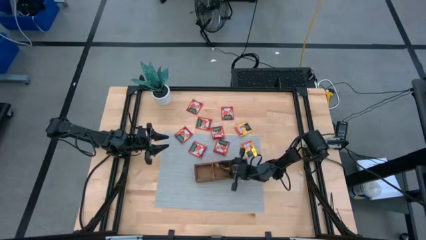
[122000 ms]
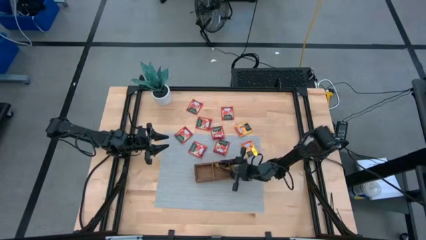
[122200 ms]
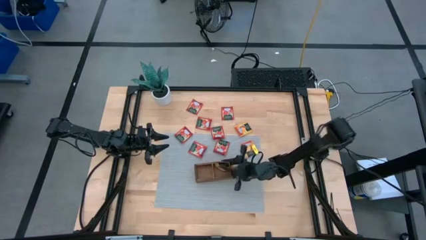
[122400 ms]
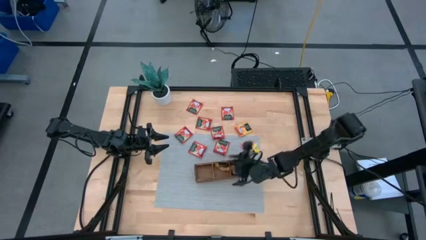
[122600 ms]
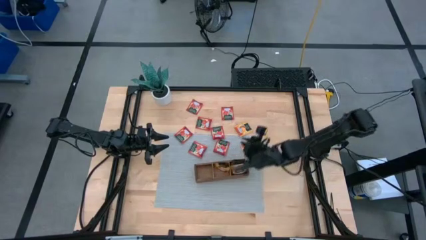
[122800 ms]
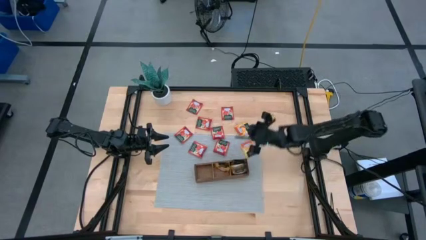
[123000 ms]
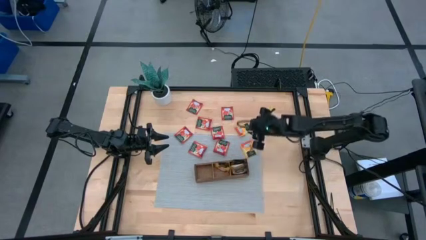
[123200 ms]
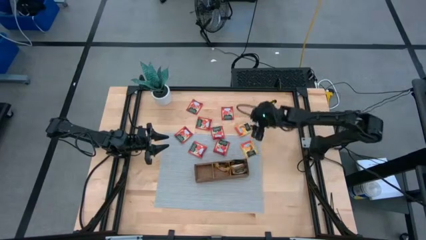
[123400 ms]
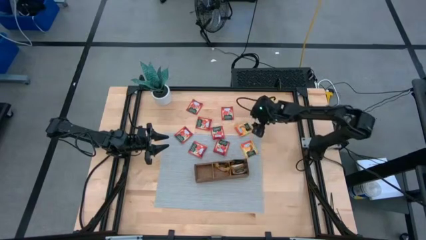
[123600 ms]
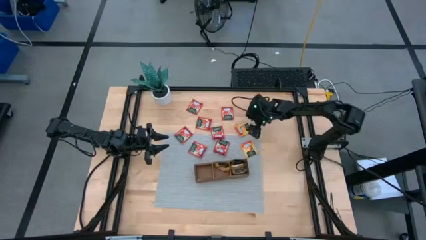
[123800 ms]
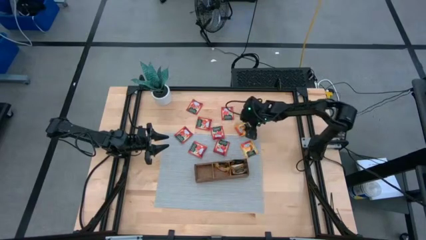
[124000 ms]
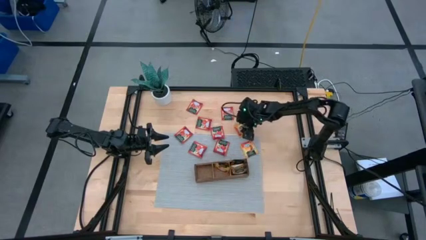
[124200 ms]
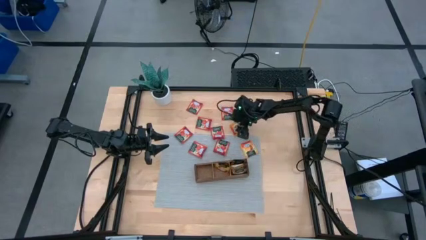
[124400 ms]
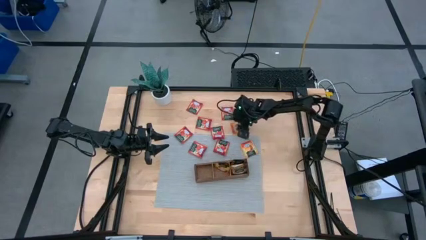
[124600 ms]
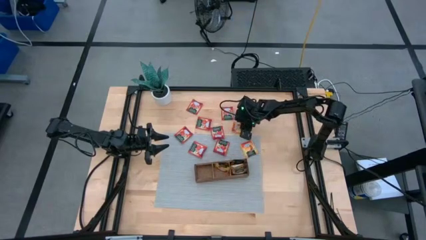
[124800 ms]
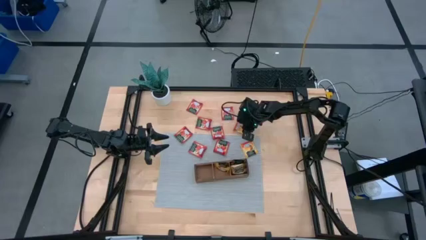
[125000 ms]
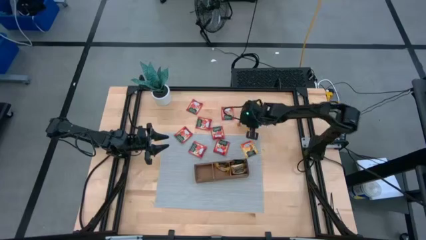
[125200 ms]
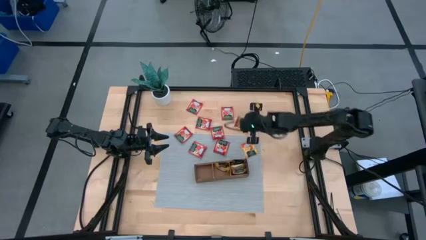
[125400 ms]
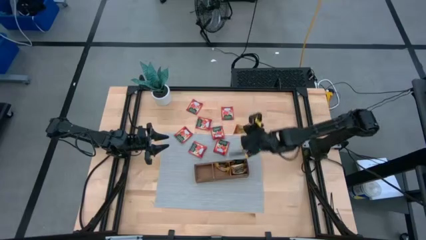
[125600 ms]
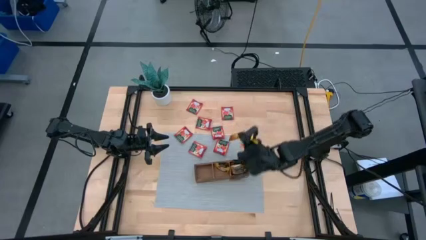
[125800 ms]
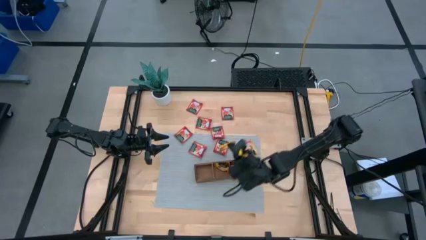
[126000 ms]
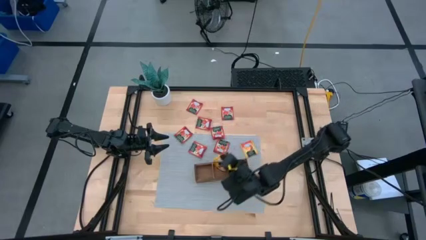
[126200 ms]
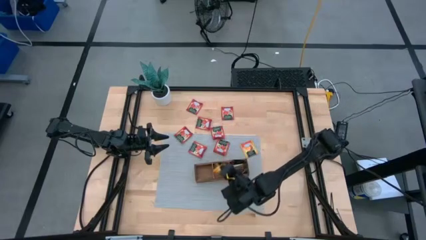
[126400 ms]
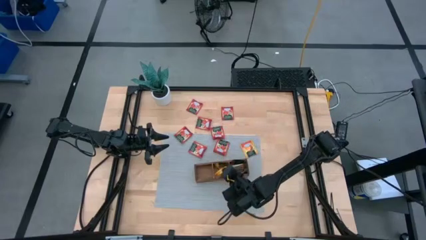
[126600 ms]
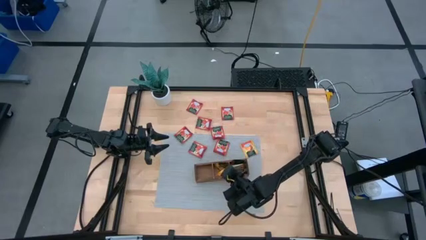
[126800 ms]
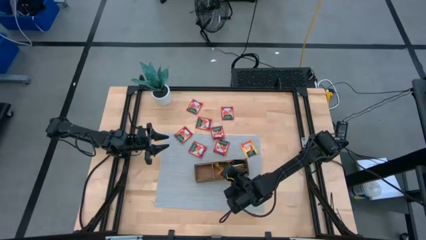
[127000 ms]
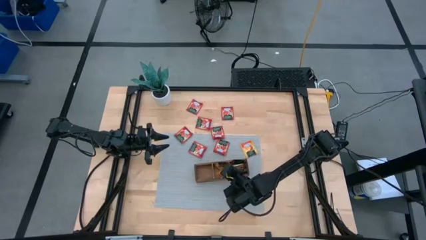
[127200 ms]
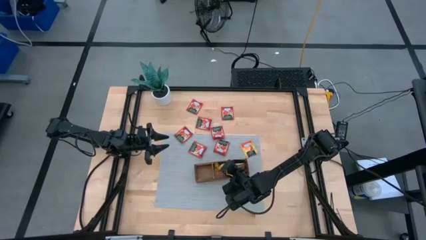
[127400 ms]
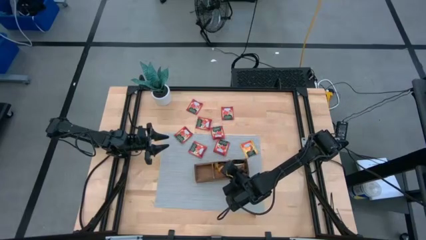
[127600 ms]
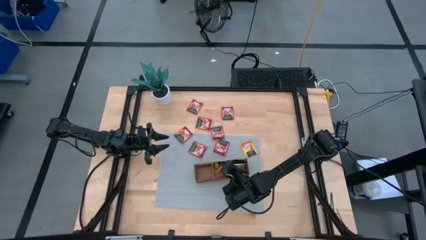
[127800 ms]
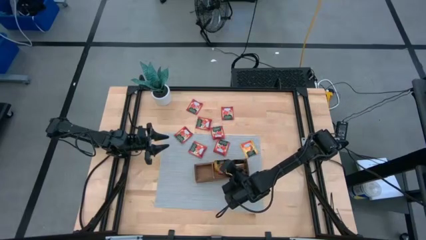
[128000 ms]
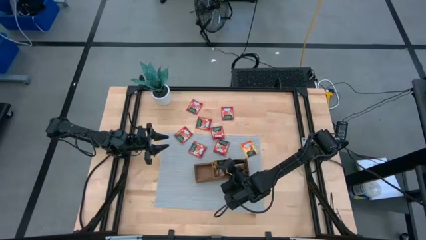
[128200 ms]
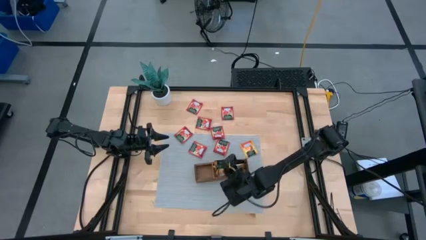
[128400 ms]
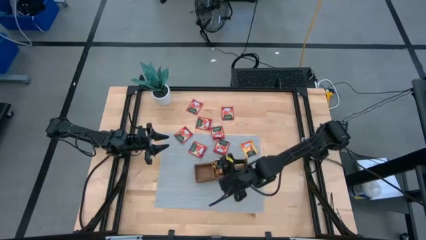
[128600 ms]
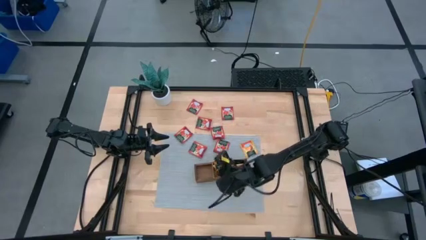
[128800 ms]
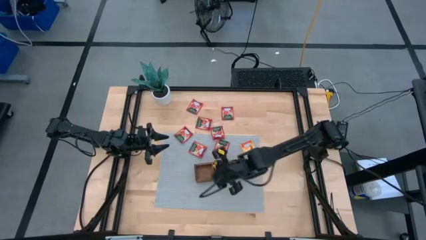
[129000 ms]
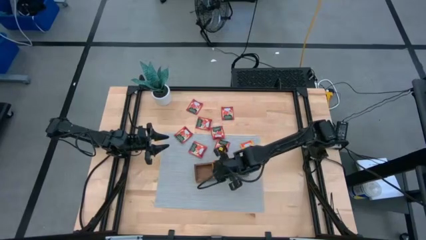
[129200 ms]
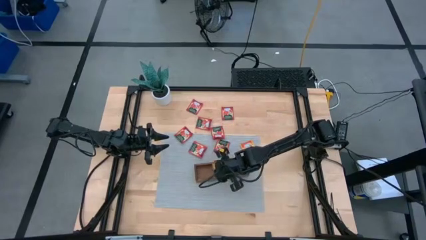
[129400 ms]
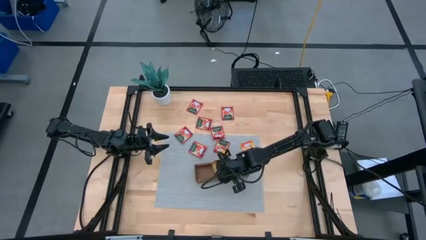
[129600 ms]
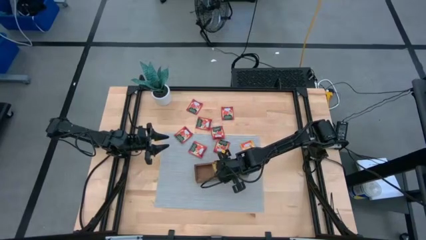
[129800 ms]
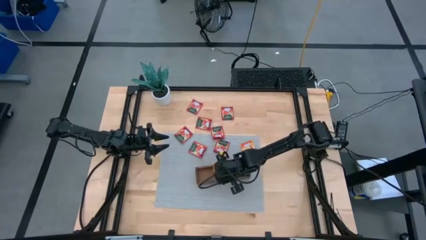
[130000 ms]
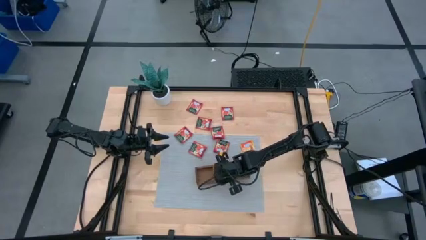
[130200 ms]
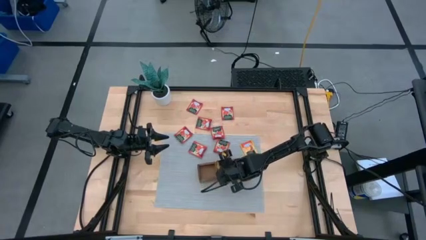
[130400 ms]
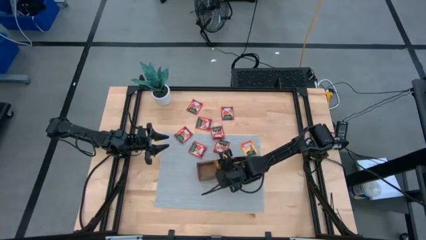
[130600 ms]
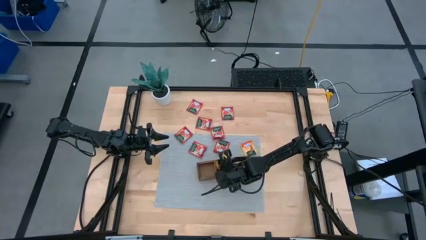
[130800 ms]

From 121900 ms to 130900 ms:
Task: Pick & Place Tea
Put the yellow tea bag into the middle compartment of the wood organizer

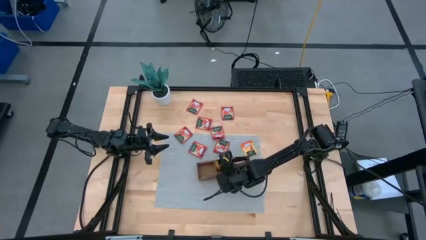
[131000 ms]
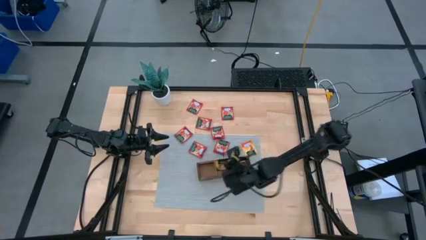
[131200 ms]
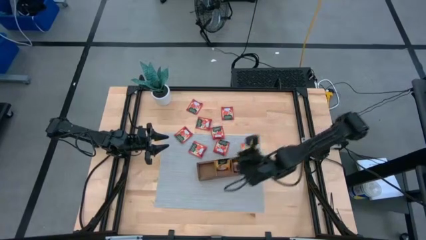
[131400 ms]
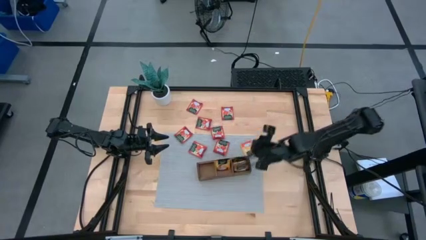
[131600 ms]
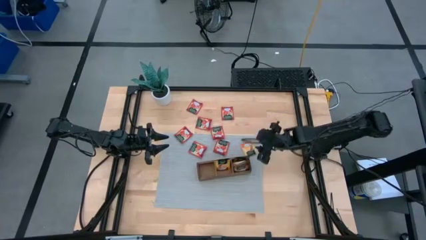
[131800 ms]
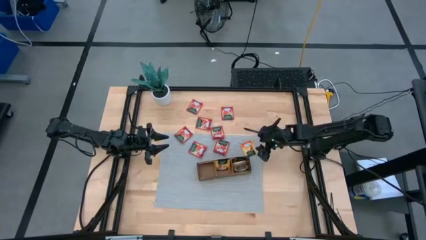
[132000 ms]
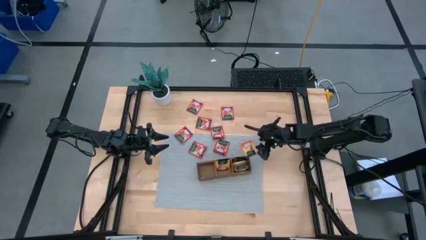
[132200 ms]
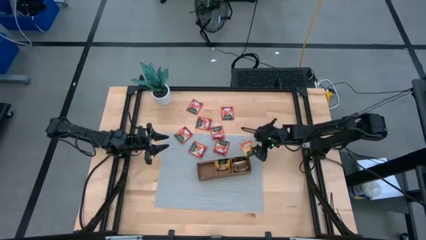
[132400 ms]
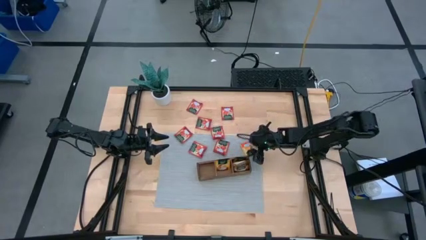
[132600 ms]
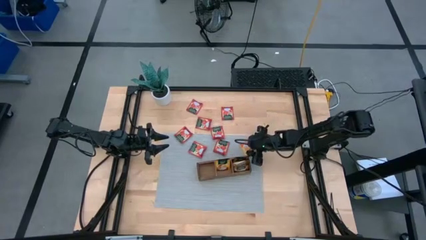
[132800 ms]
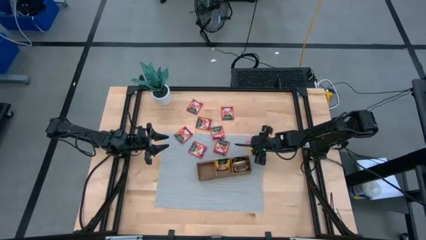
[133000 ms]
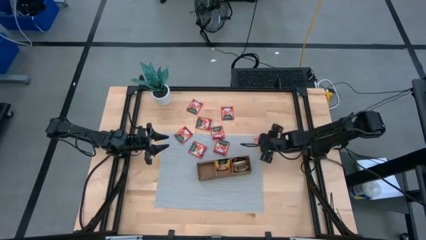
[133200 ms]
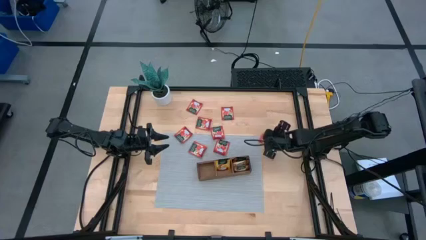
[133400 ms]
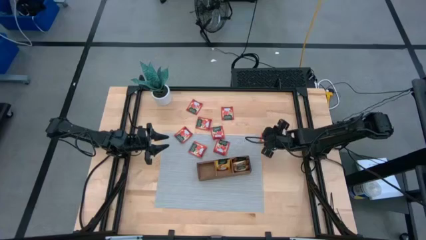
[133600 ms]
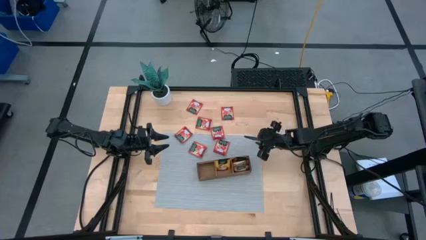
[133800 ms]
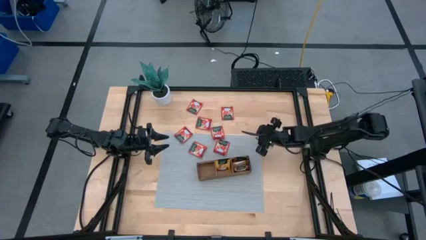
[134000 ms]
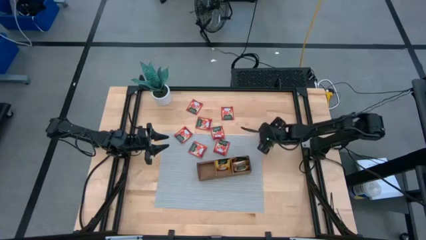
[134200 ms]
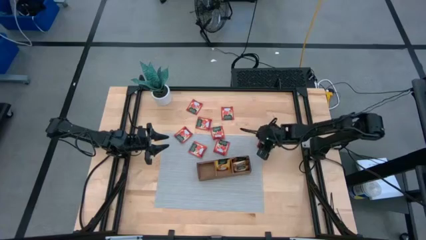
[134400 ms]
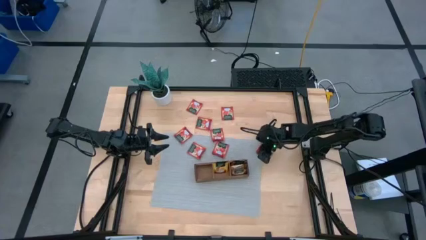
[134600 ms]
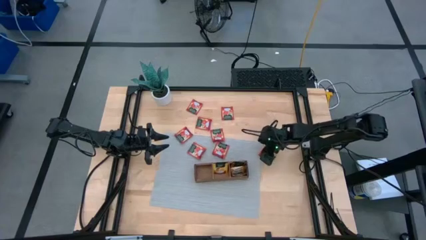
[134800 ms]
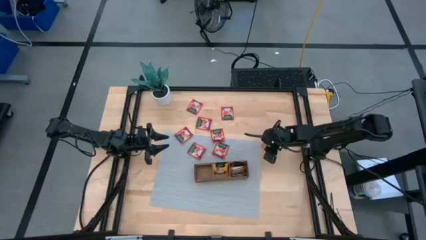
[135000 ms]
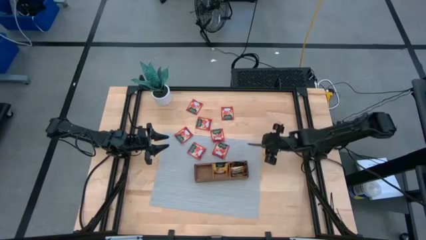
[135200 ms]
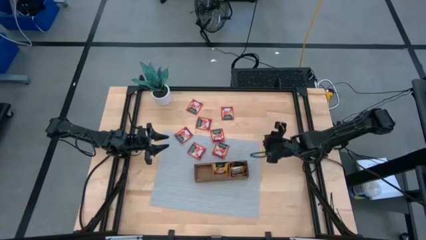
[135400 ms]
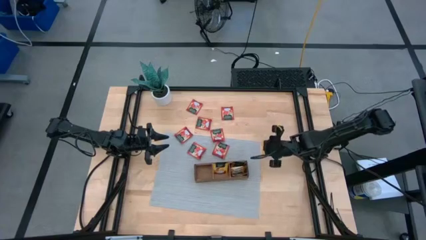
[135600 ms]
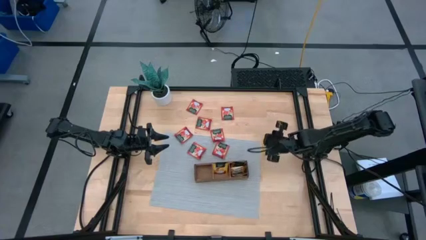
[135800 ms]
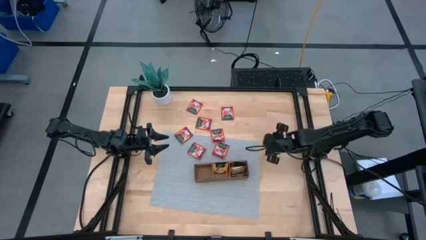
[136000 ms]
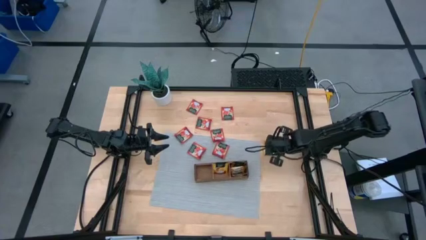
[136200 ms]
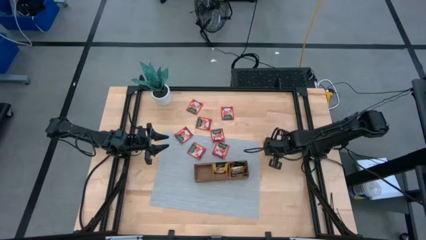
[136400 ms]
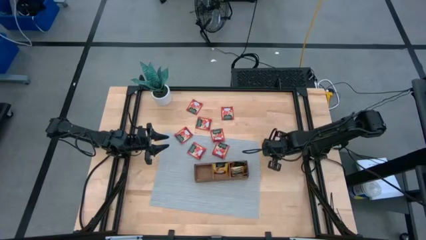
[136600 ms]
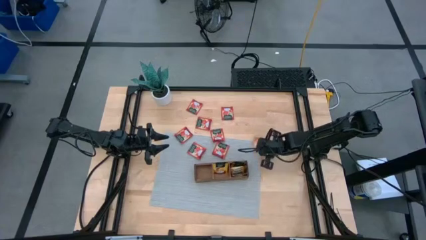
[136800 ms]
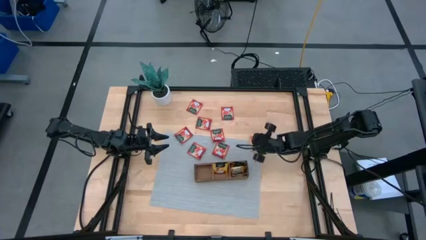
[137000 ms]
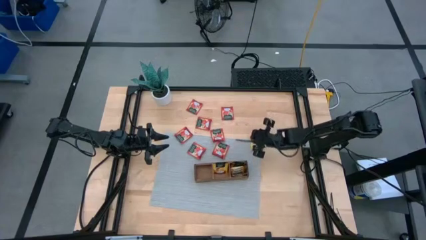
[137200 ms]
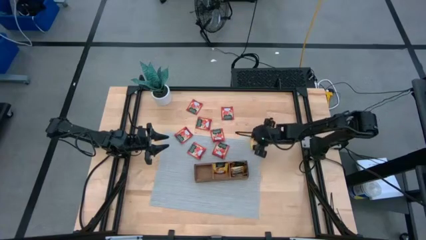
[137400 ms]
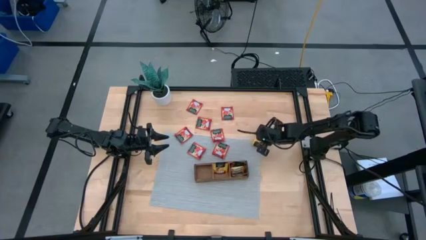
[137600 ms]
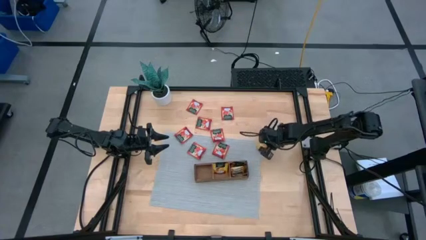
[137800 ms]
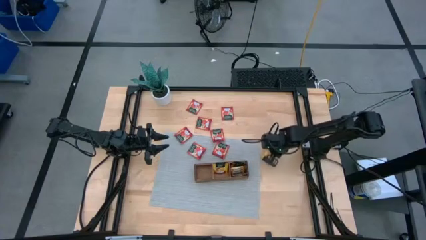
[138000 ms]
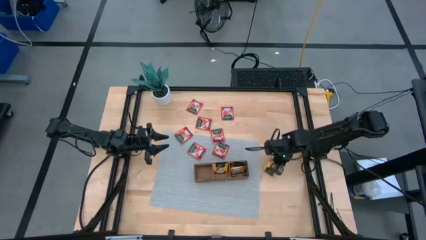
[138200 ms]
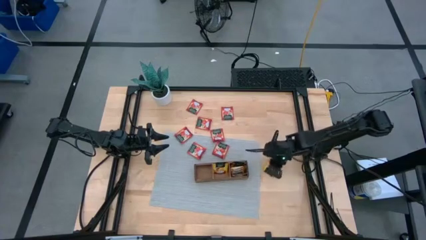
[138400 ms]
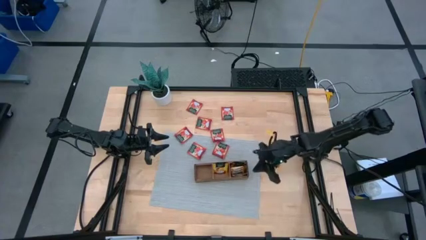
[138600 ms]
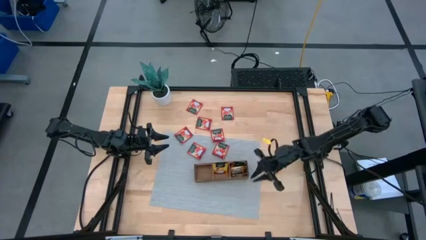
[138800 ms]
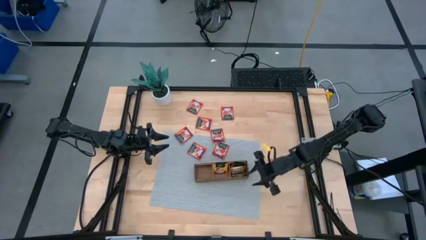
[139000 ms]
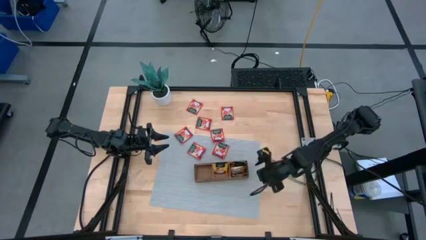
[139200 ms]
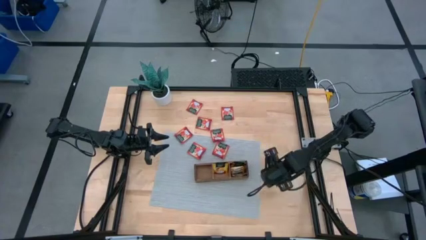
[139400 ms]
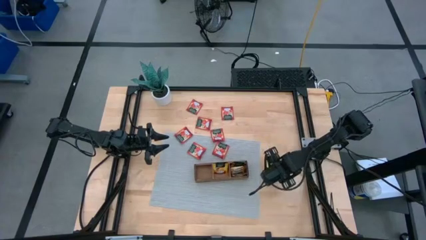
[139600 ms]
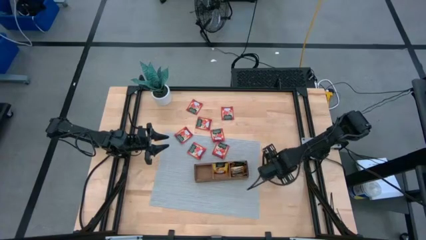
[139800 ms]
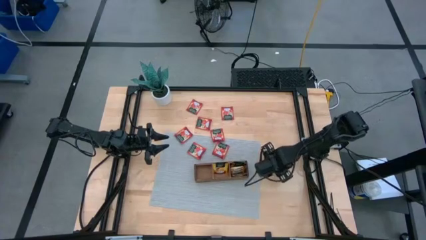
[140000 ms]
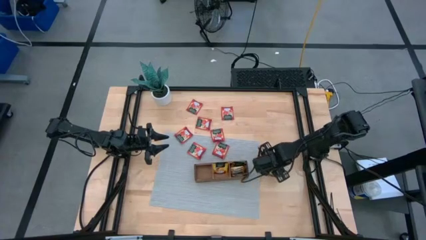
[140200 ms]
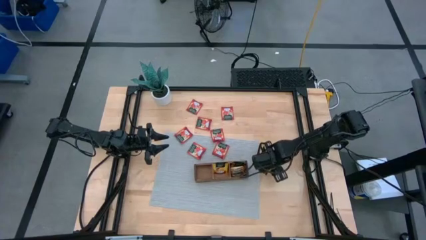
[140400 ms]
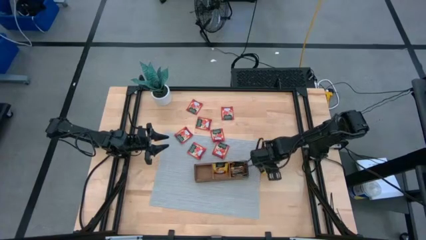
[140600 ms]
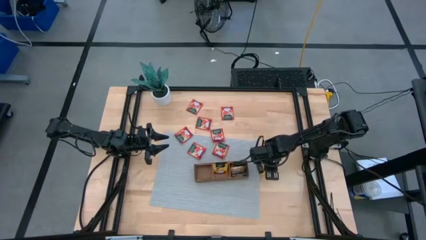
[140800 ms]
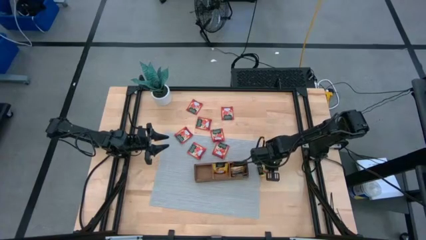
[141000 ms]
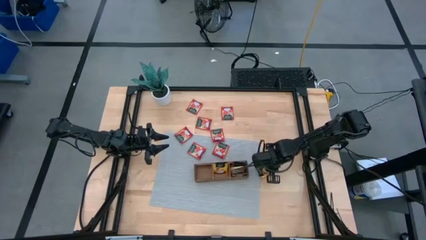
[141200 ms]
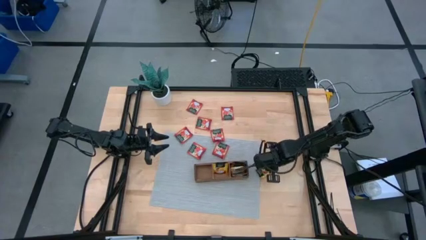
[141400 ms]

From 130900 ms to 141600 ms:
Put the yellow tea bag into the middle compartment of the wood organizer
